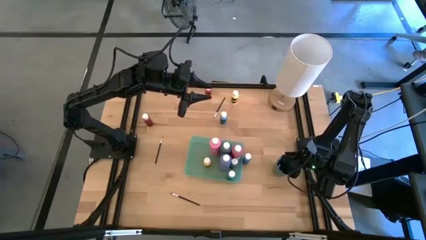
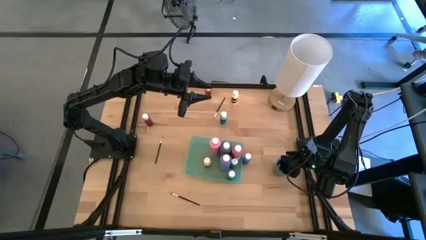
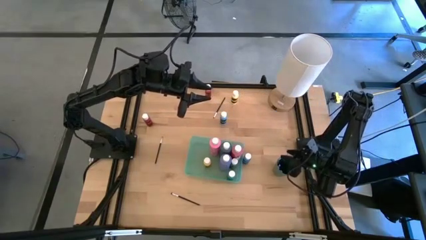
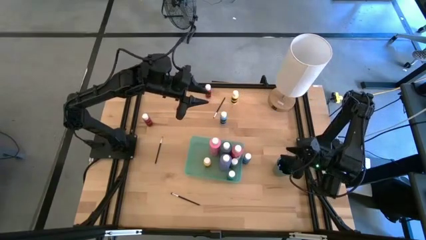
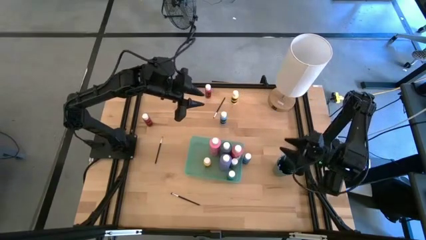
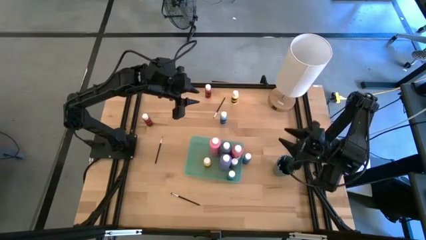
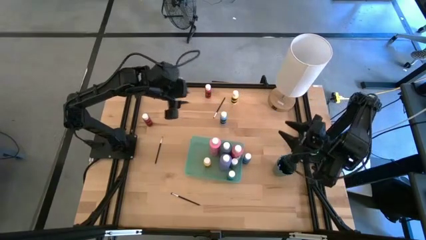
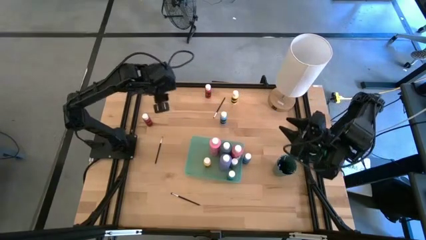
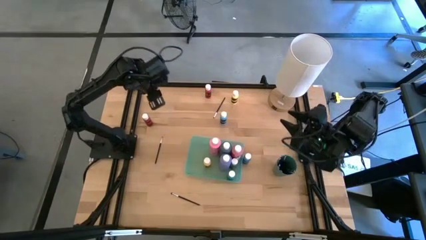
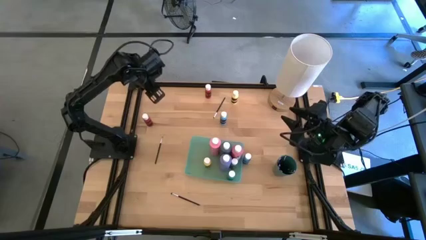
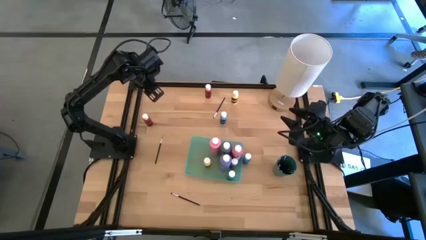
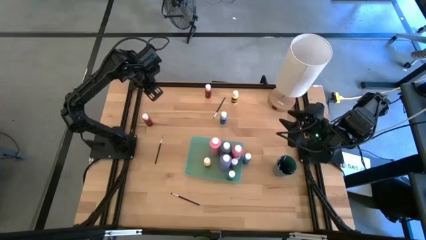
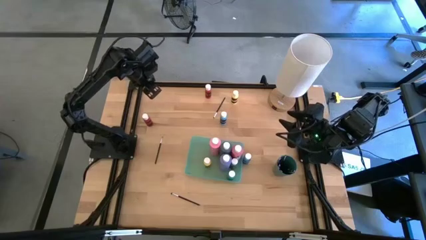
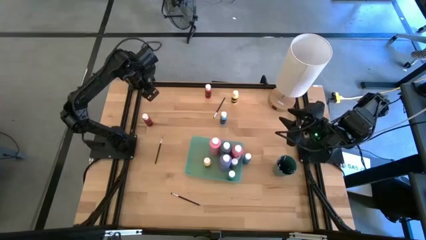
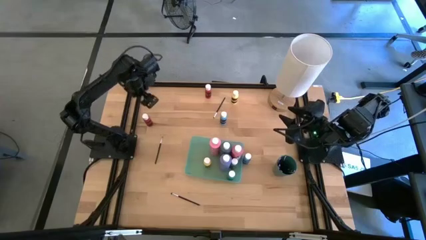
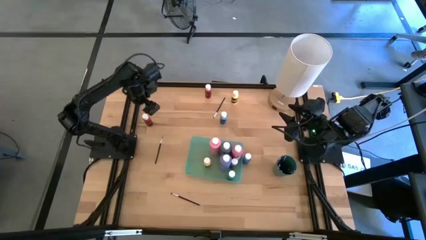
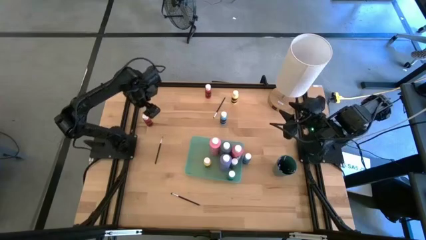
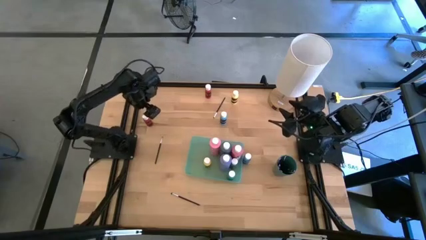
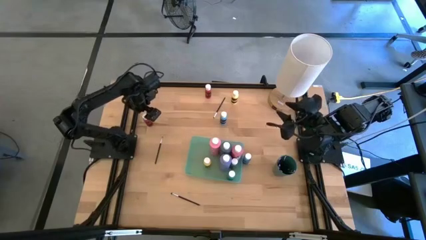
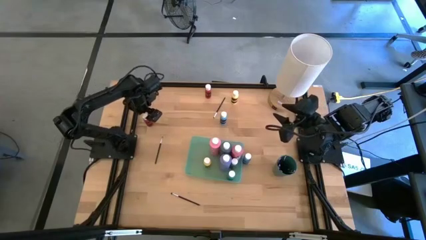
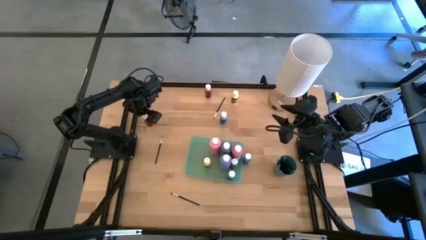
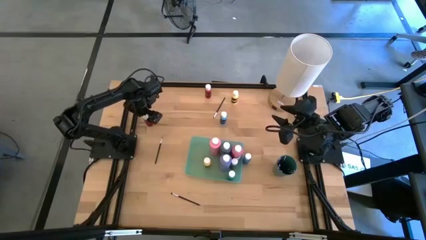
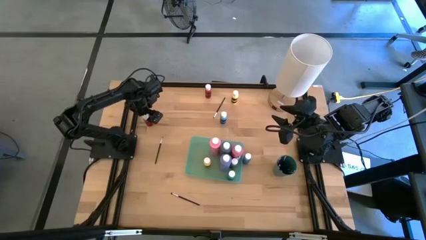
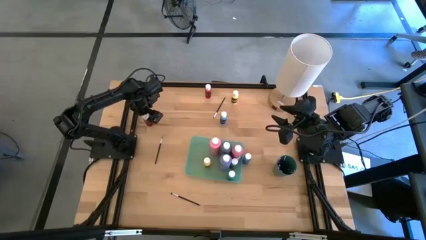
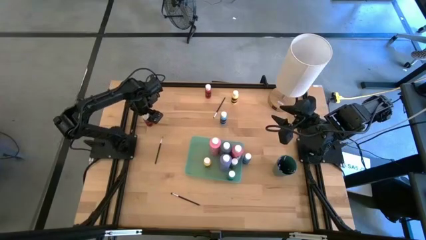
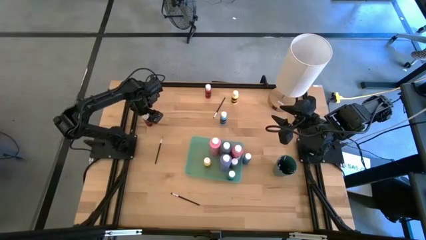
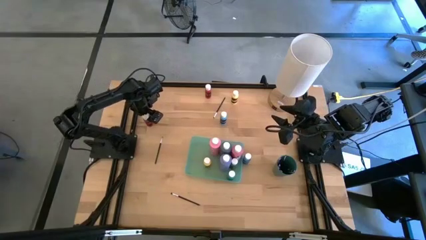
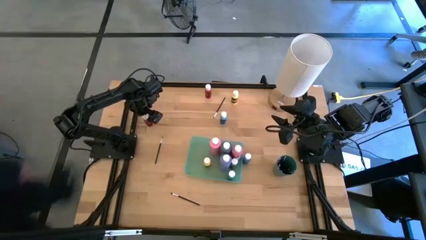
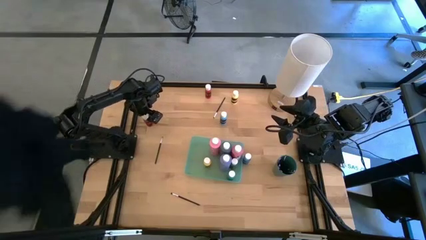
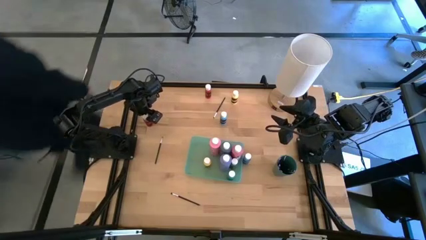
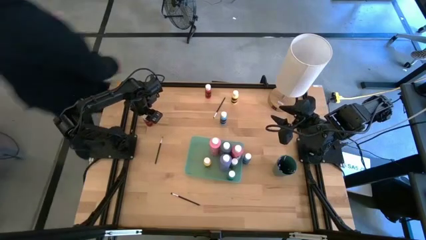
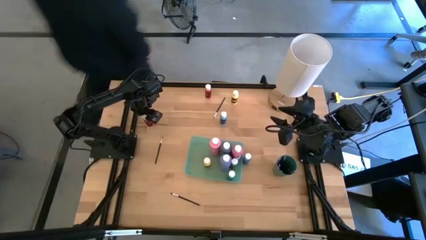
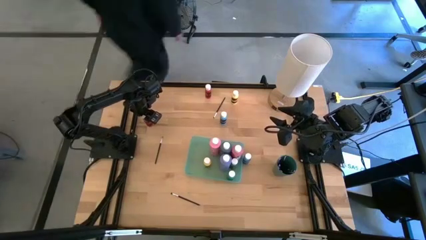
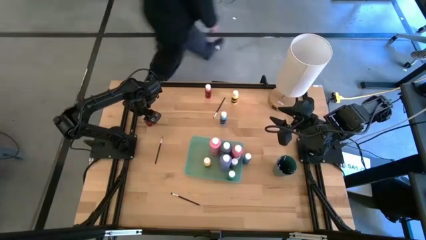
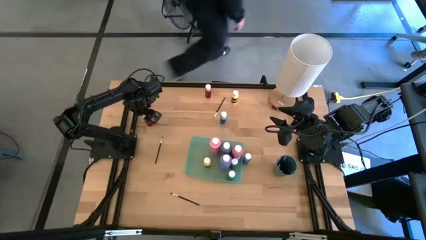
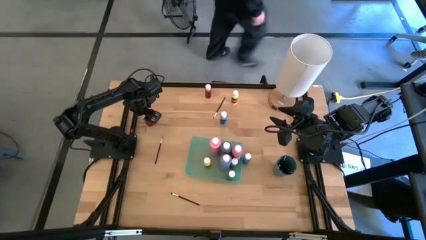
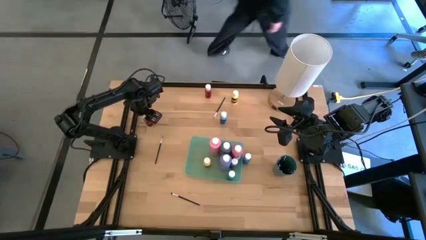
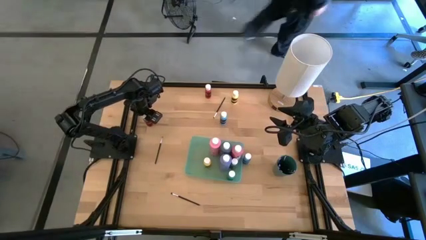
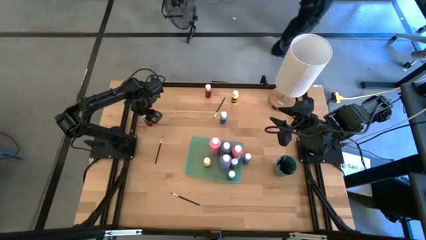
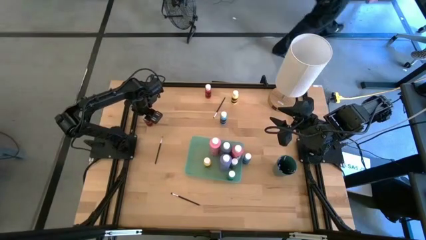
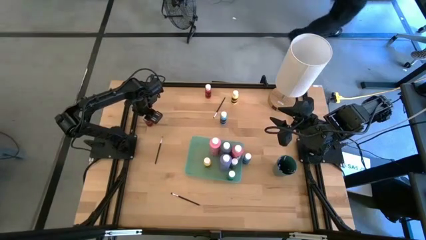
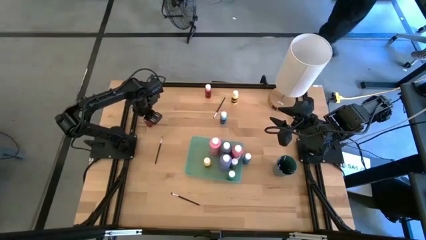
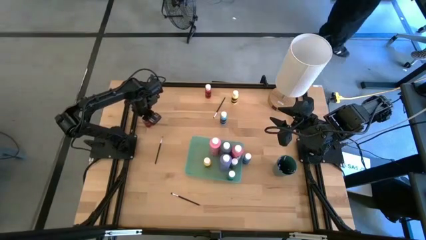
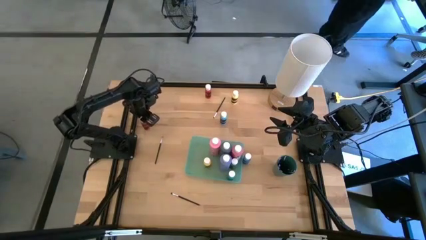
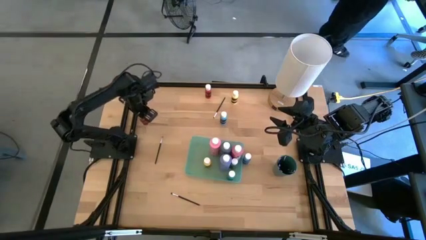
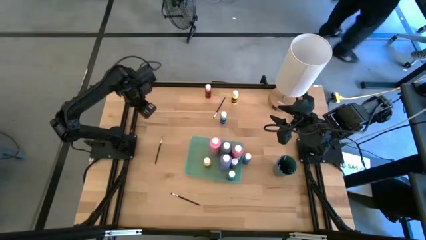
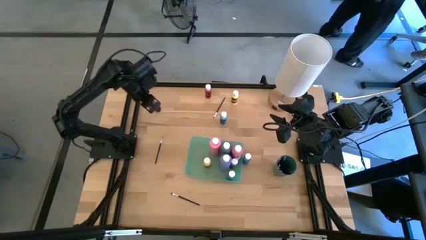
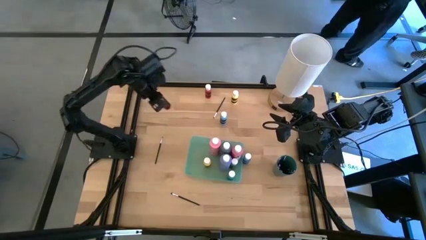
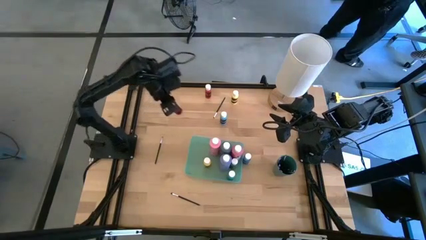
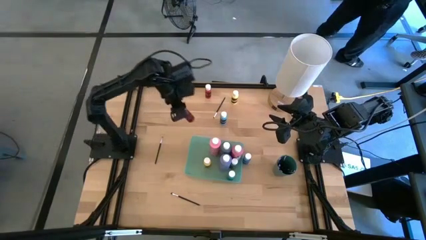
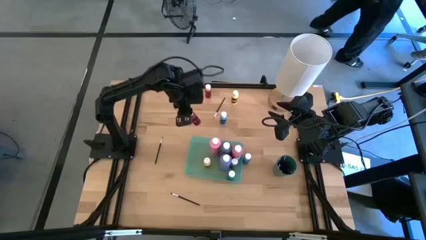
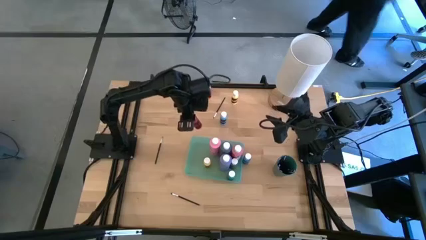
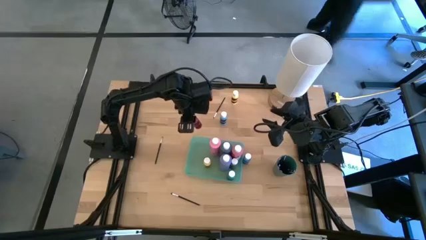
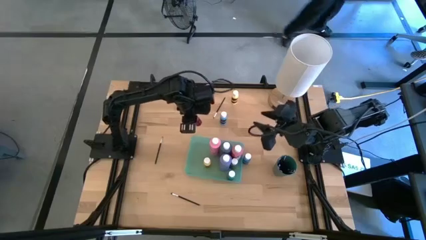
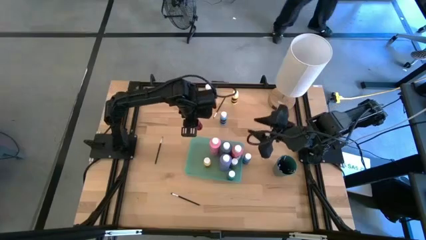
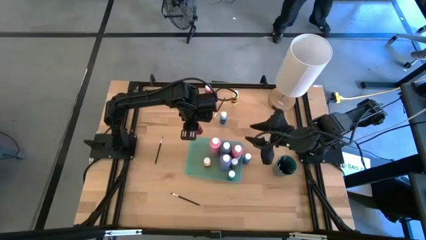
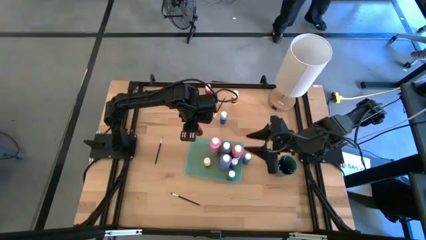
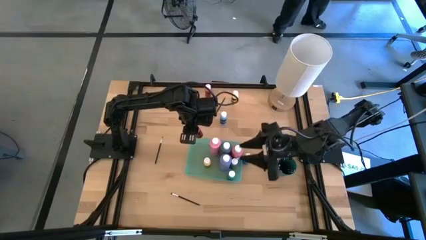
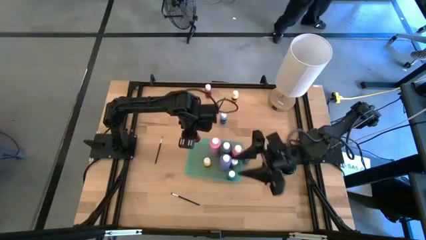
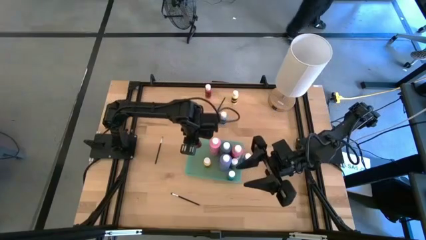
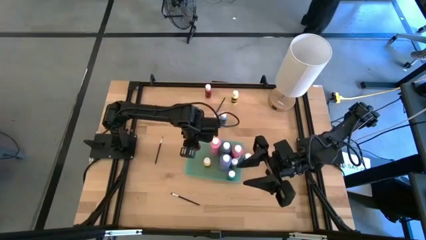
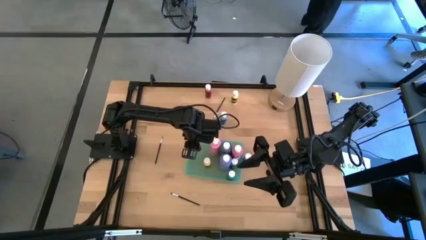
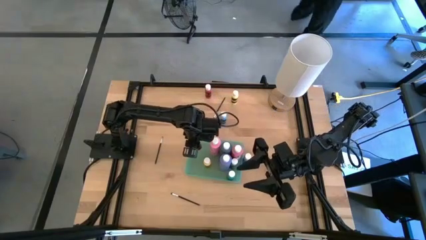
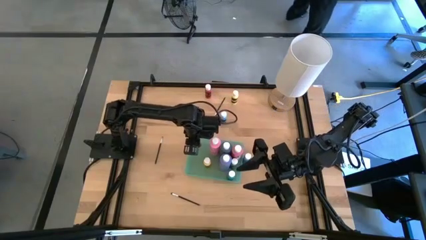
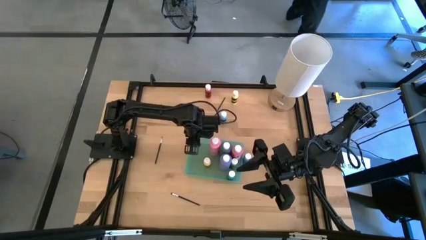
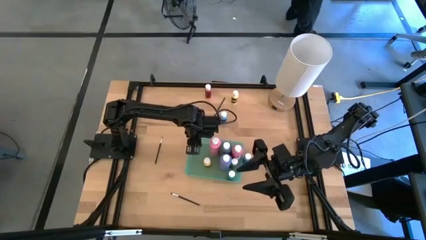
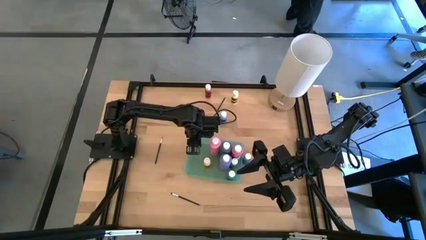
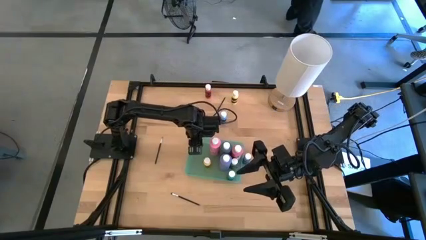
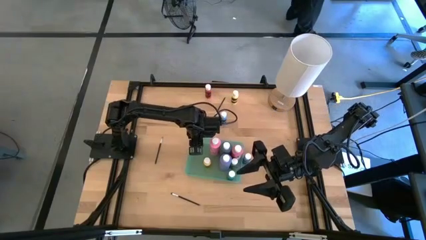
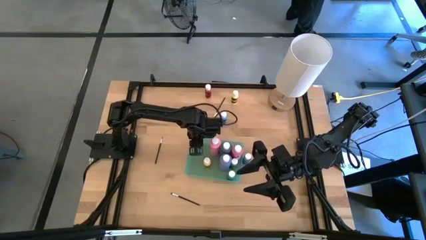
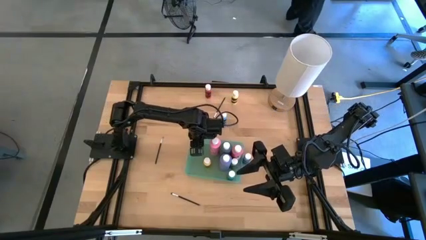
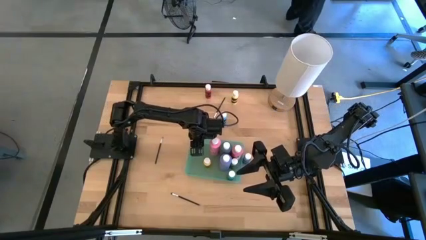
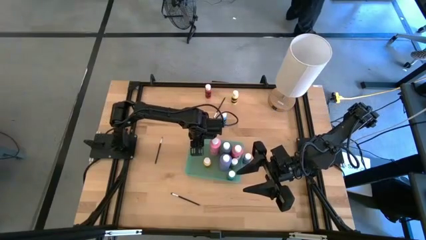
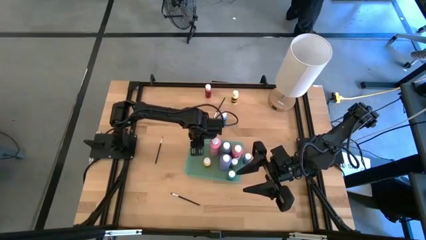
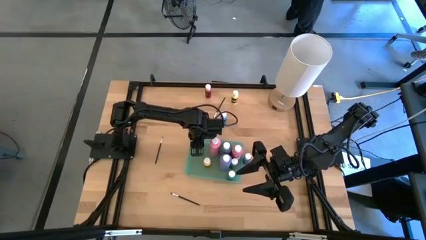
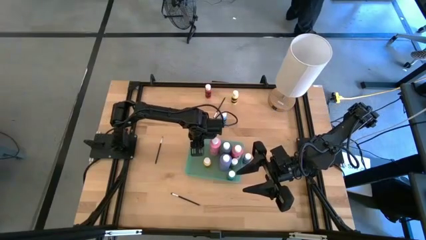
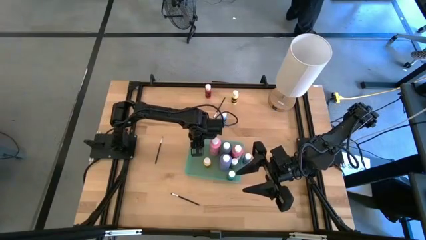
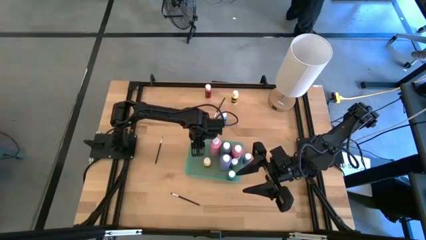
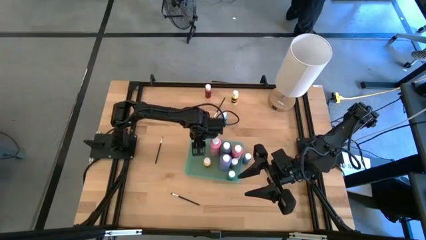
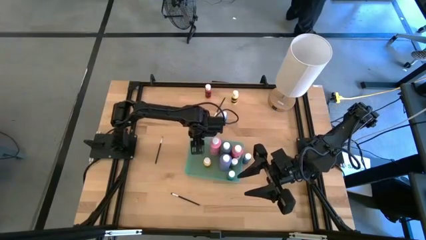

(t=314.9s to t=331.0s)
Task: Pick & Place Paint Supplies
Put the small red paint bottle into the light green bin
